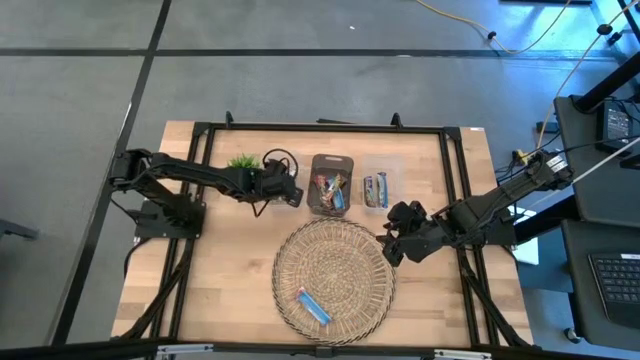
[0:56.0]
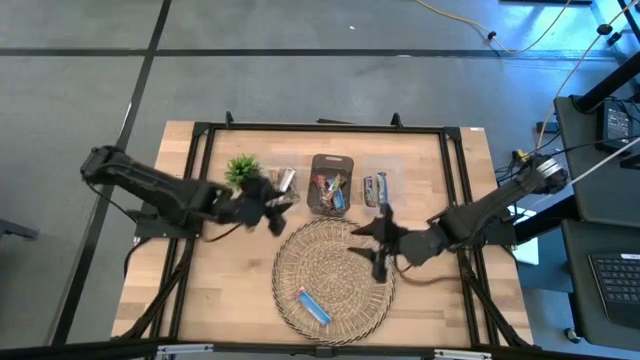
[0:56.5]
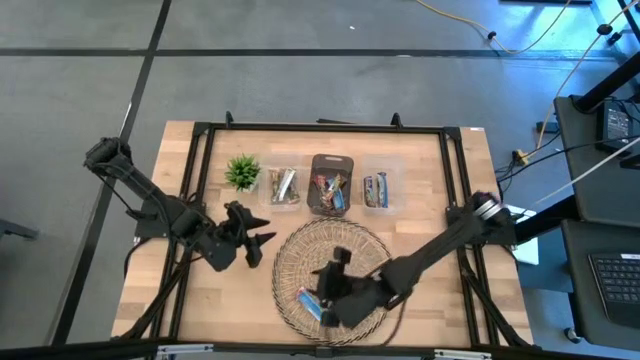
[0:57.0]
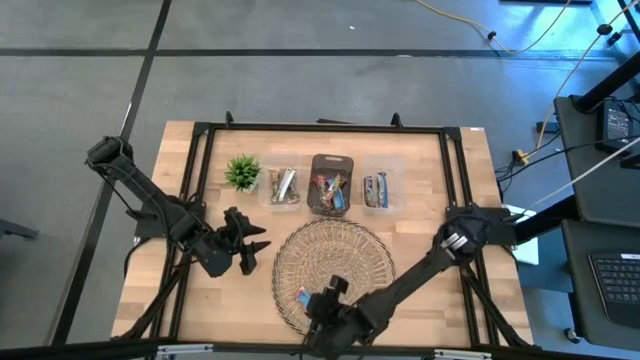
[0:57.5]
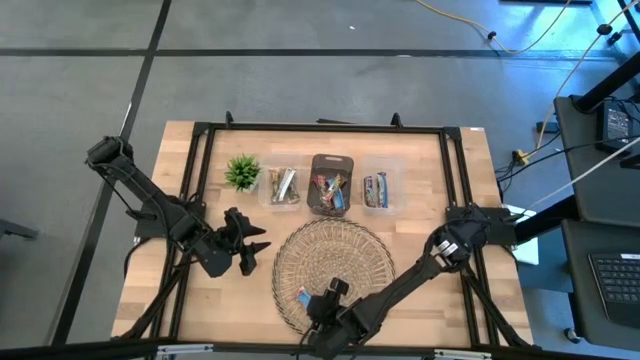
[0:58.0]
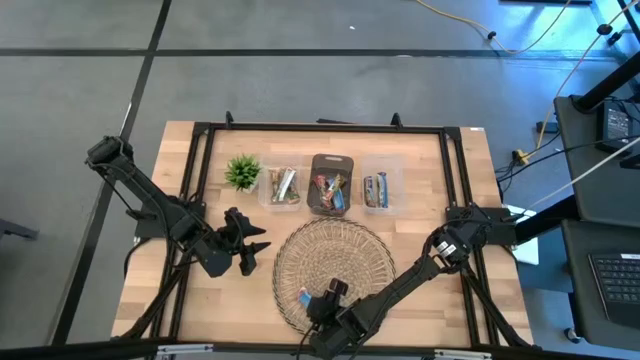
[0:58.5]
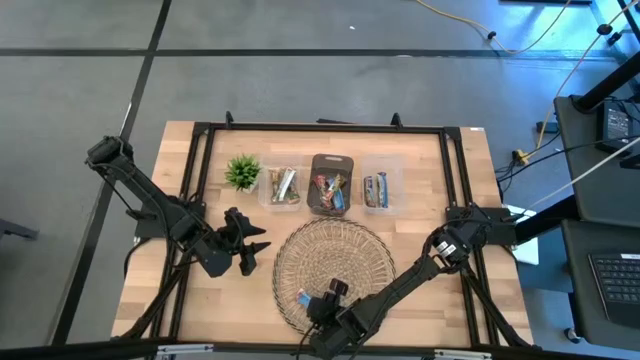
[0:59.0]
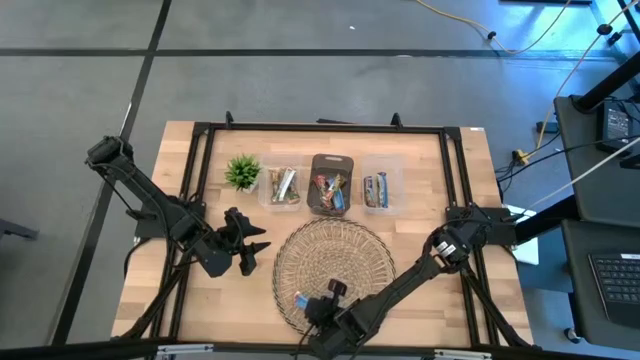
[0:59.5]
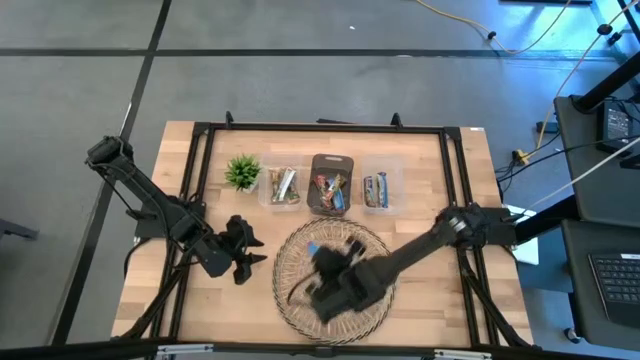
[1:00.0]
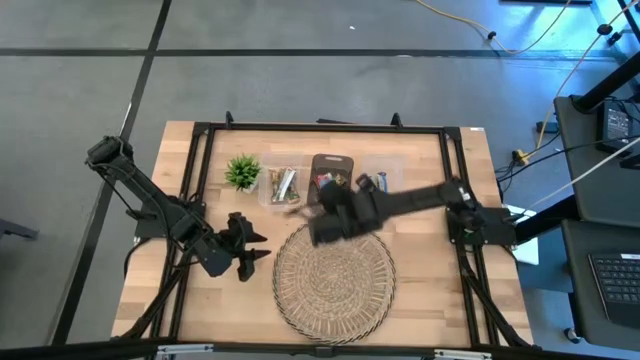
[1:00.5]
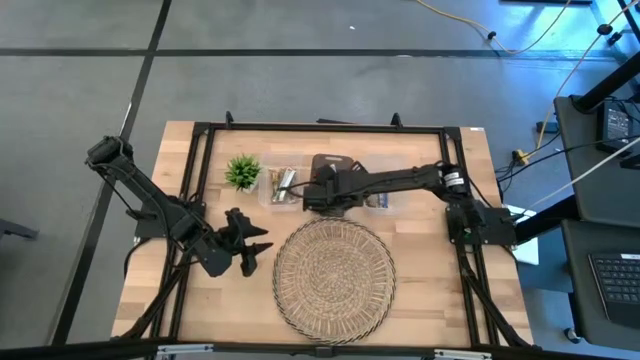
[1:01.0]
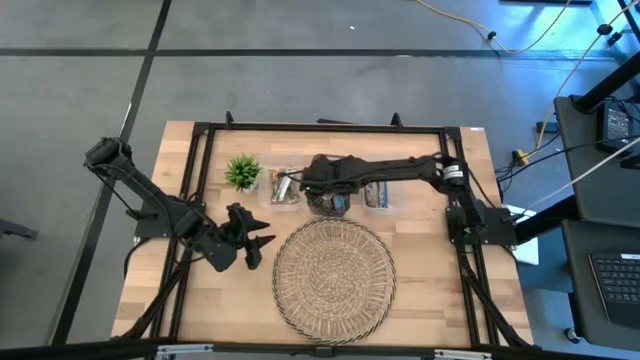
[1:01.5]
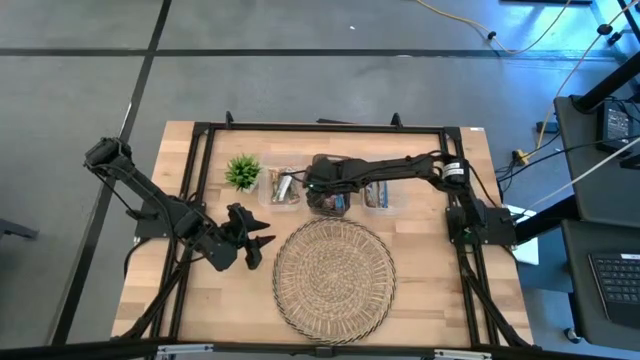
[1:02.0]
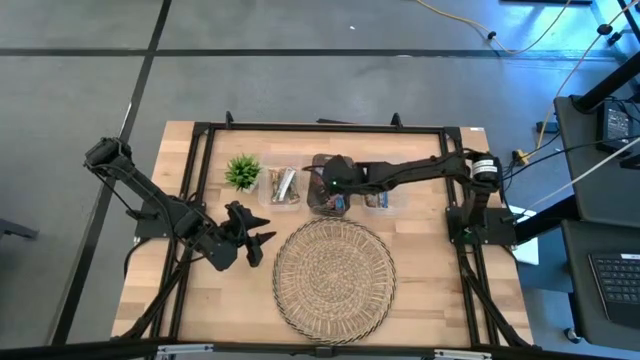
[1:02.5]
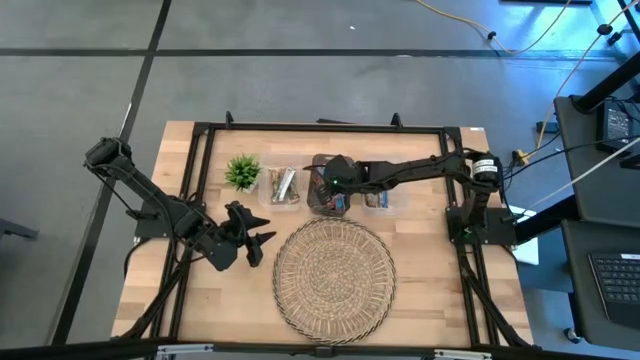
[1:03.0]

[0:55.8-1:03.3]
Task: Pick and place Granola Bars by type
Put the red granola bar into the black bin

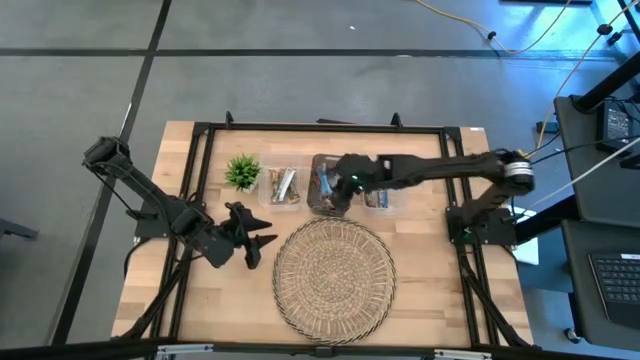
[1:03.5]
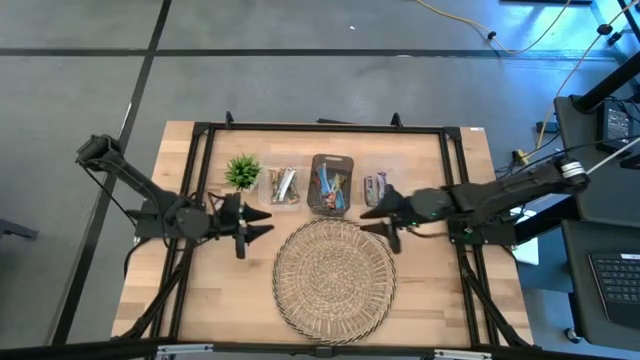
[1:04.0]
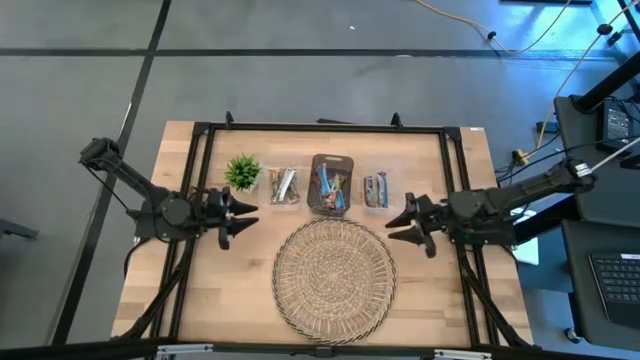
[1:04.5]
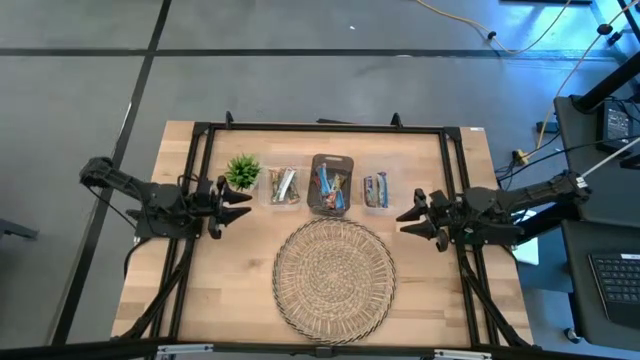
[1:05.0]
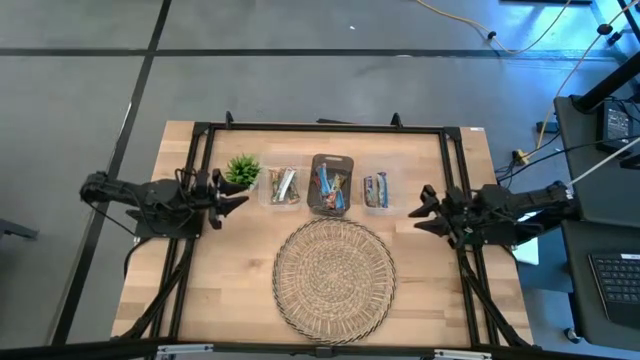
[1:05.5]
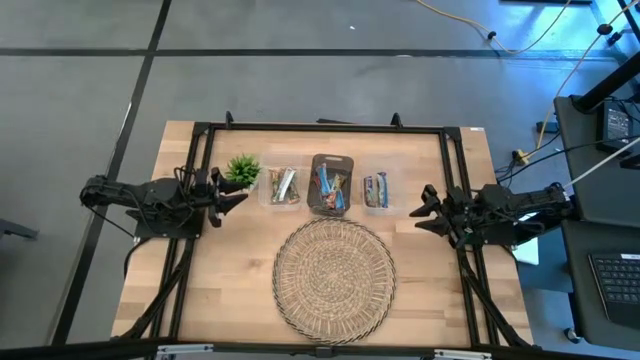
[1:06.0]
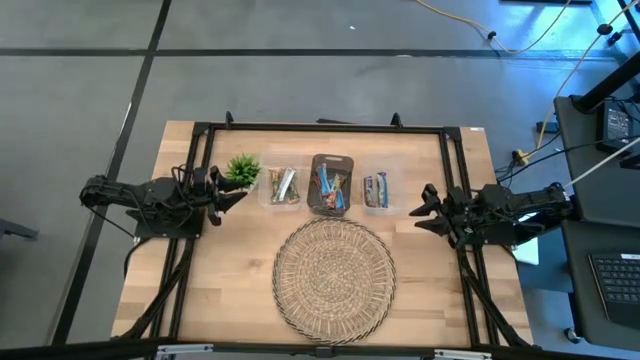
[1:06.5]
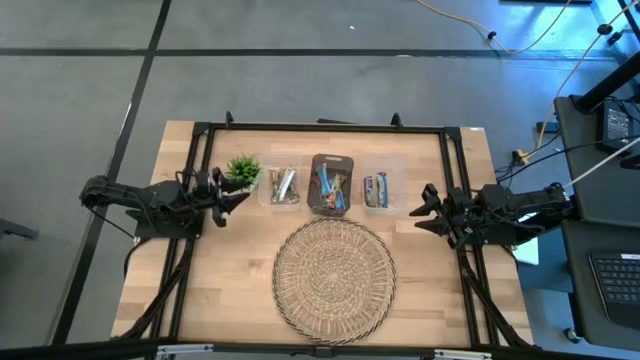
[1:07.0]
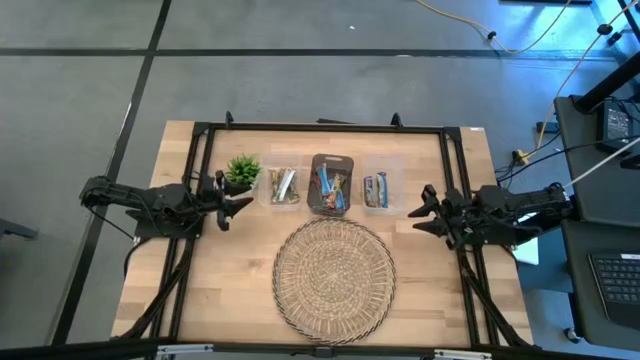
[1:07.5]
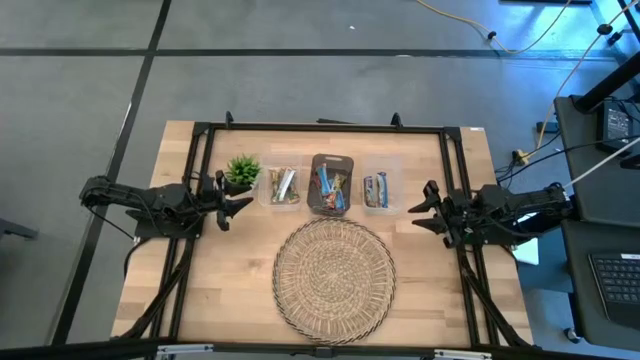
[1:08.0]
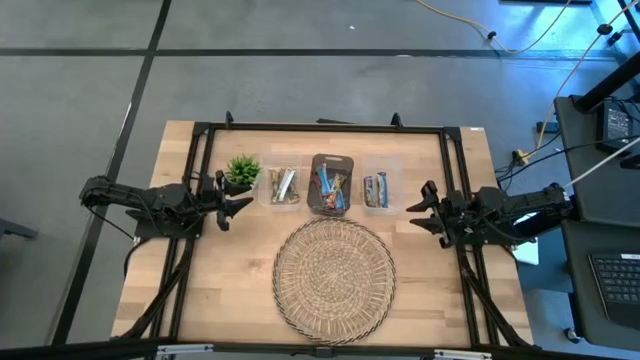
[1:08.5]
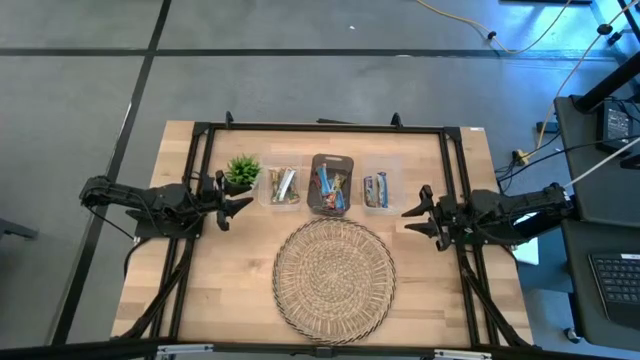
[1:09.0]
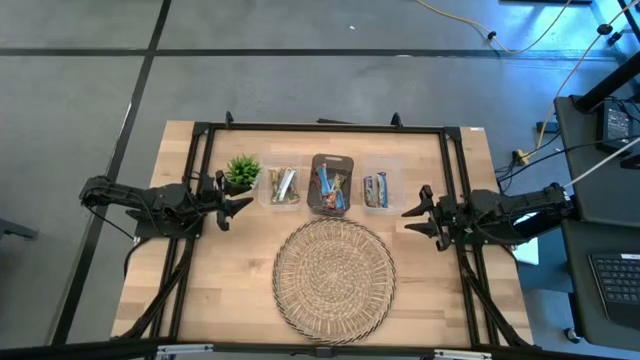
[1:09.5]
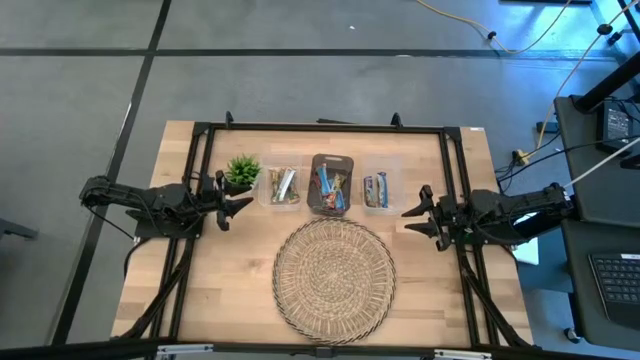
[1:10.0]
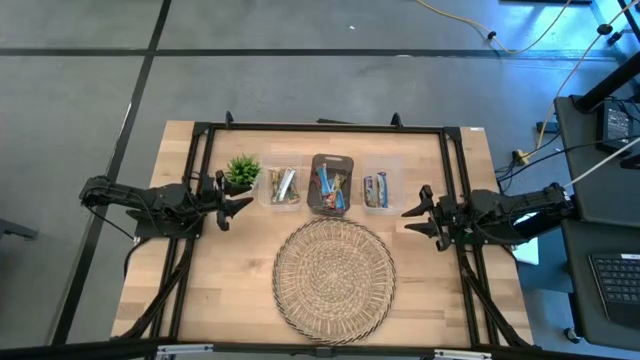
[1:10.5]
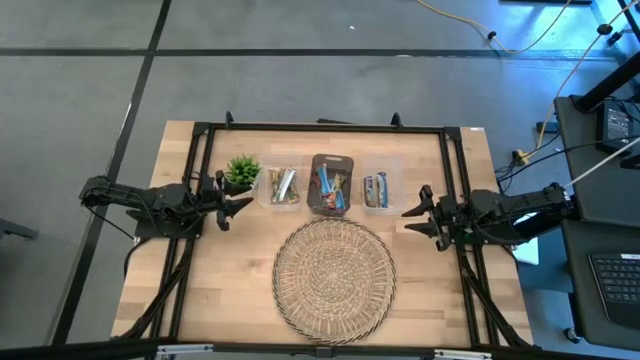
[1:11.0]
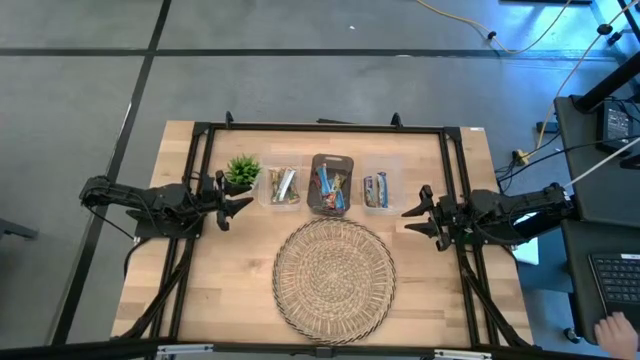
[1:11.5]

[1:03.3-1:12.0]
Return to Home Position

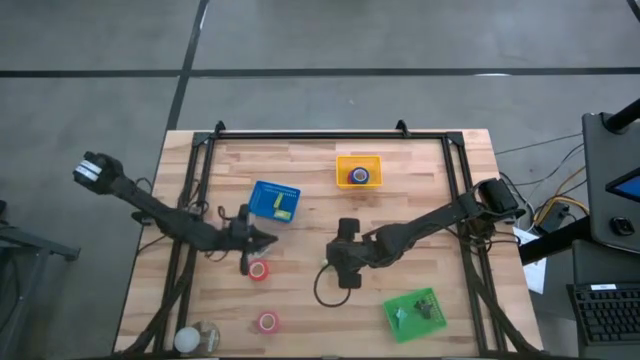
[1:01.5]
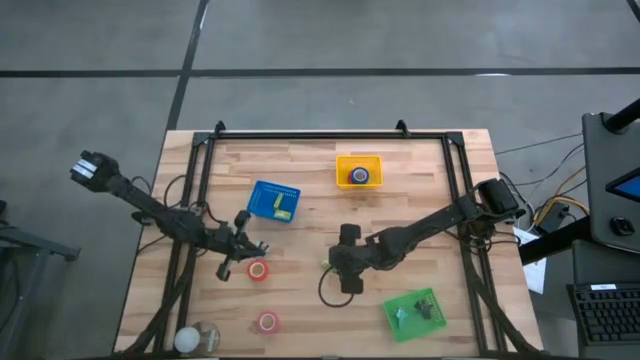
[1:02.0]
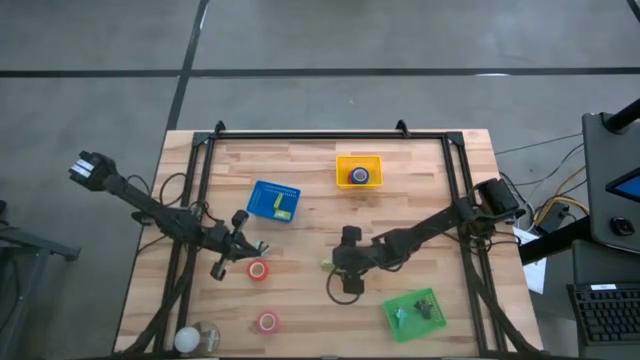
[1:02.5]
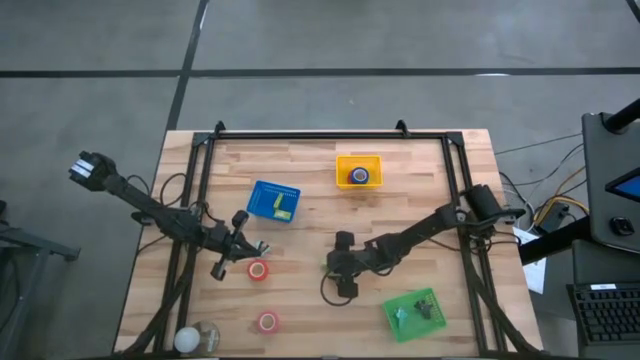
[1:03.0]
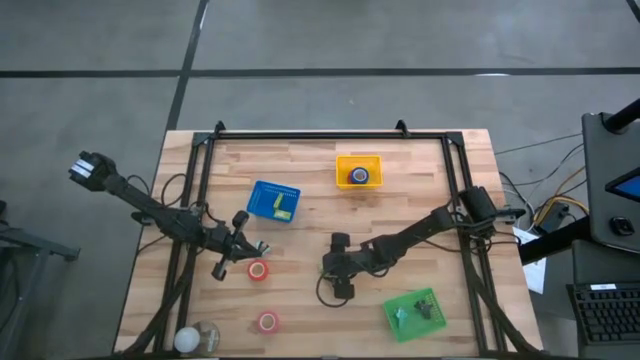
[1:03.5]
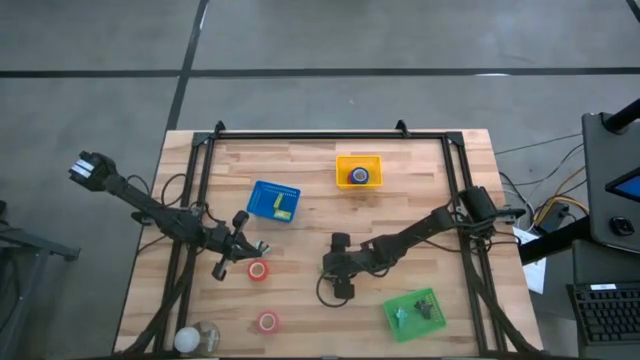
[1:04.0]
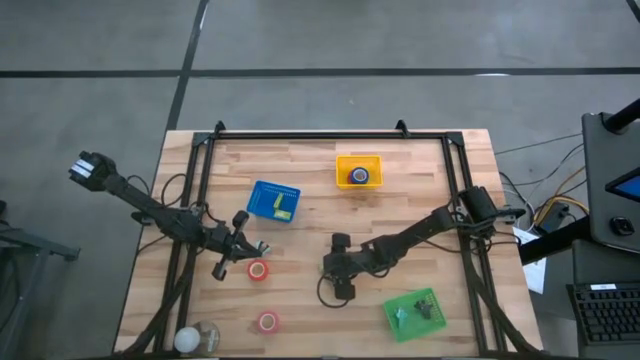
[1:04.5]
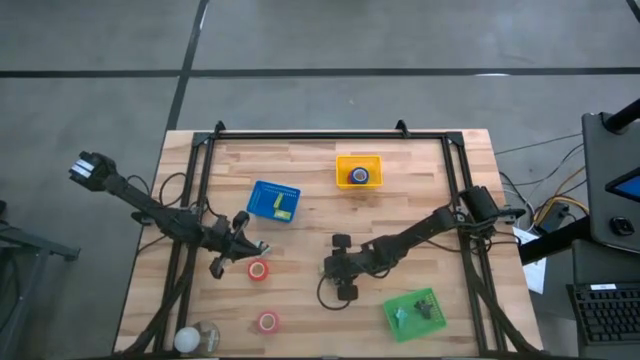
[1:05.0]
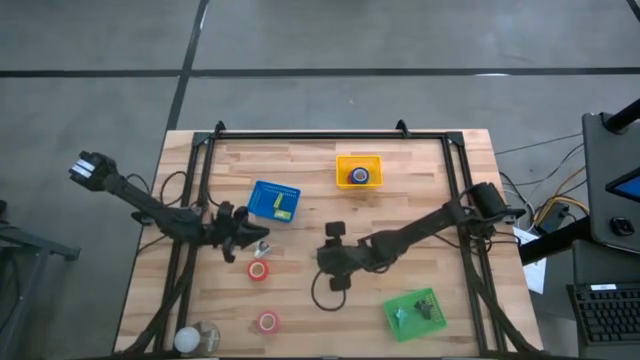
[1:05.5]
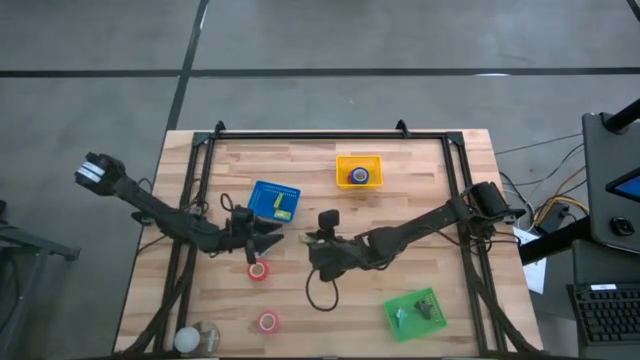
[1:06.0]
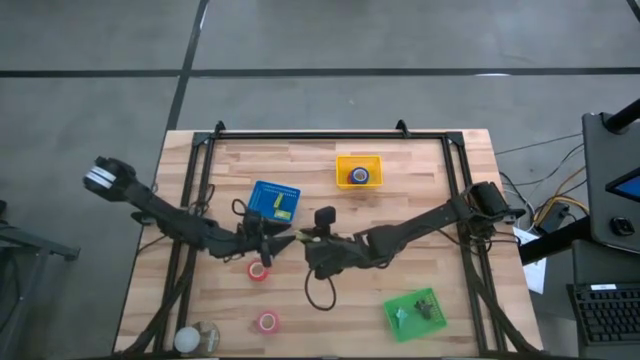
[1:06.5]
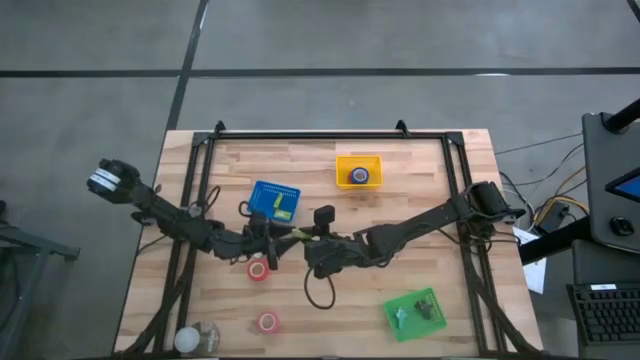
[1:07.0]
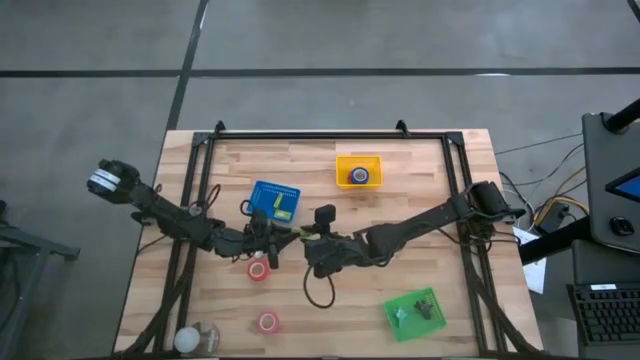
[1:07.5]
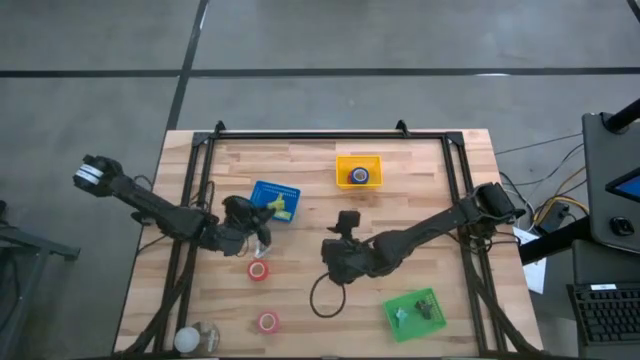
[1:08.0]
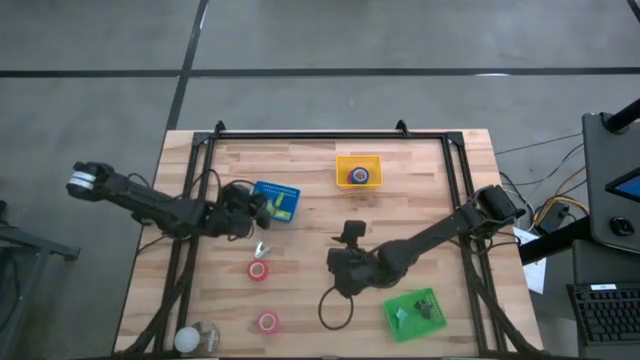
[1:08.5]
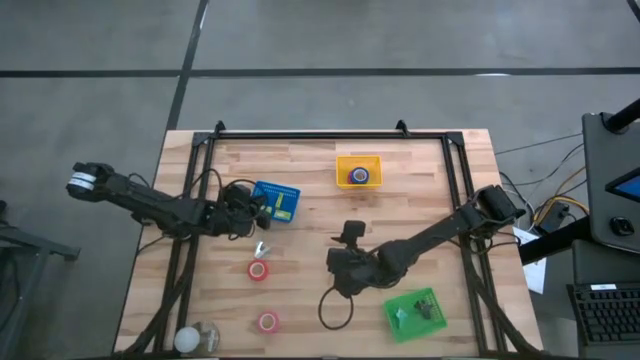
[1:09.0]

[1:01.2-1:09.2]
Task: Pick and place Stapler, Stapler remover, tape
Put the green stapler pin box into the blue bin
